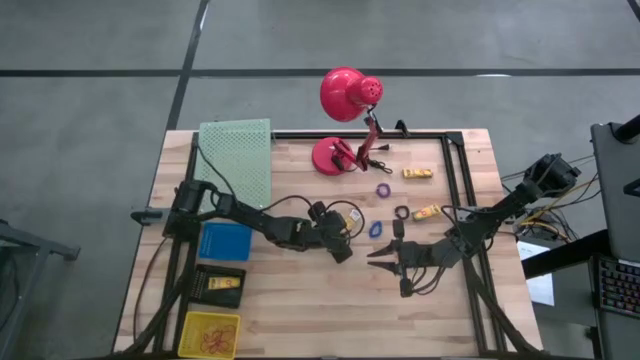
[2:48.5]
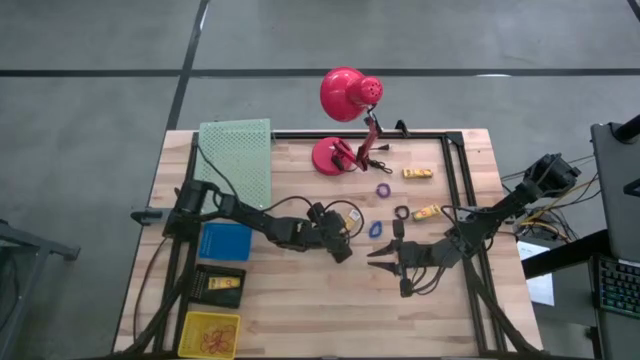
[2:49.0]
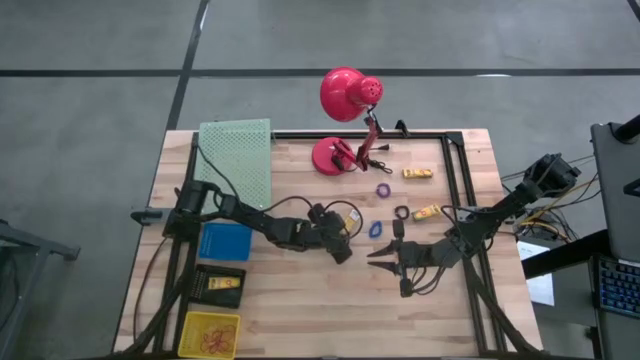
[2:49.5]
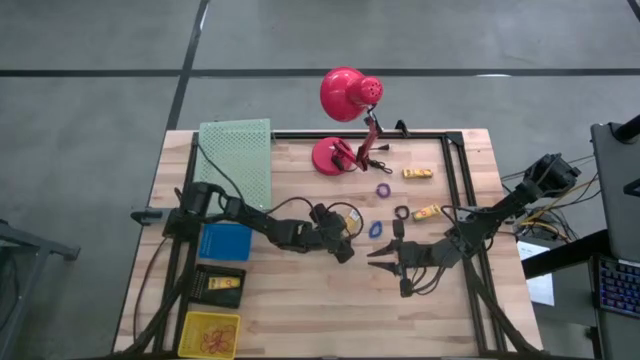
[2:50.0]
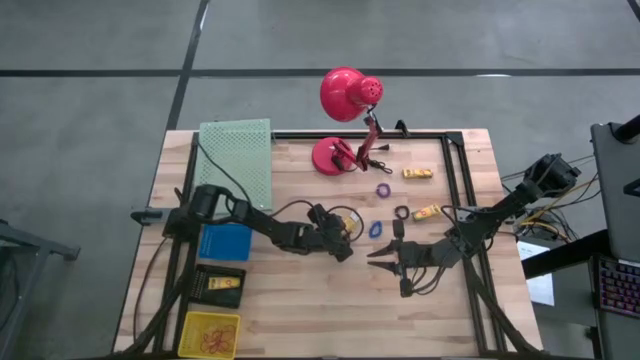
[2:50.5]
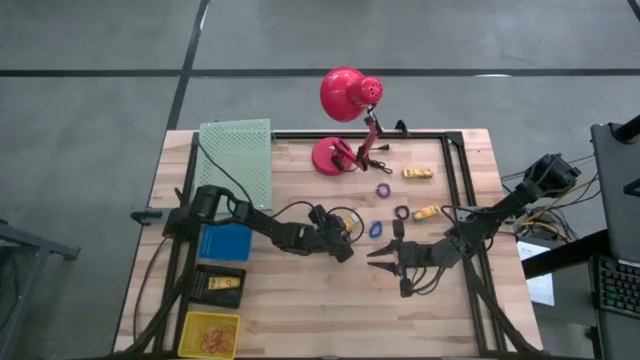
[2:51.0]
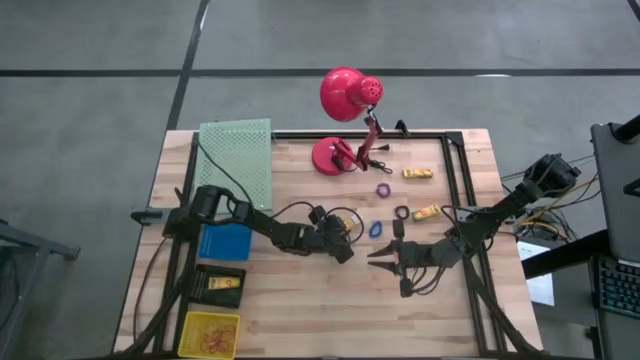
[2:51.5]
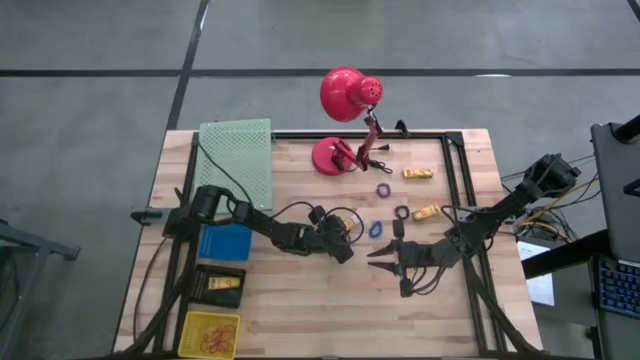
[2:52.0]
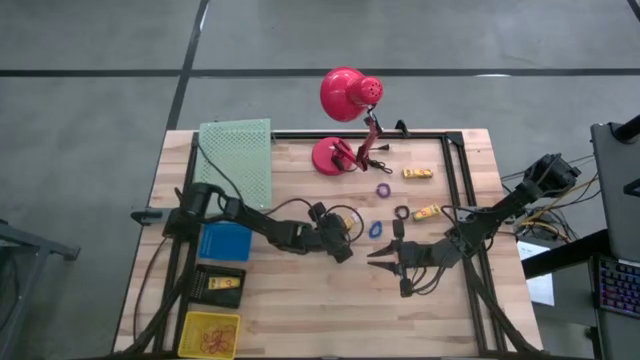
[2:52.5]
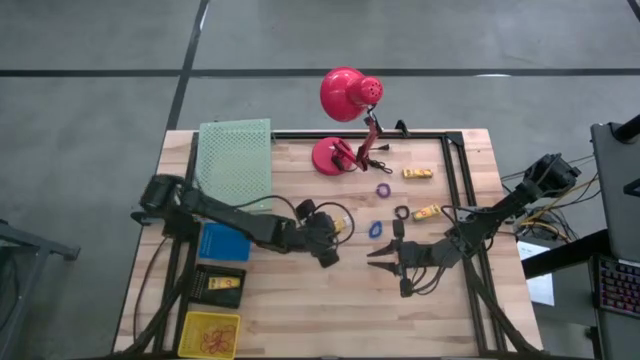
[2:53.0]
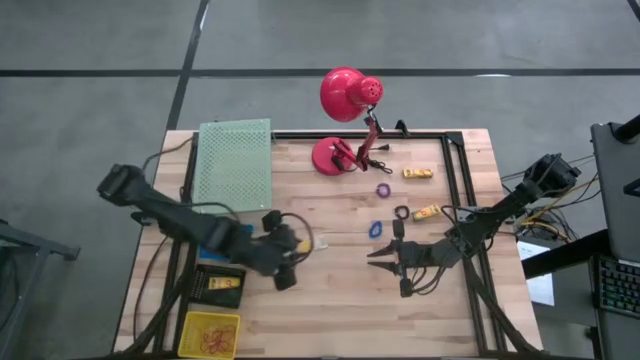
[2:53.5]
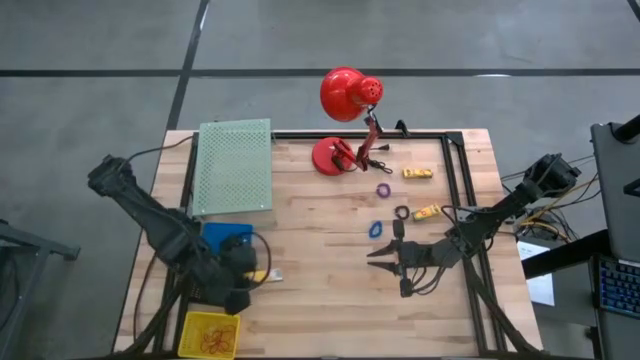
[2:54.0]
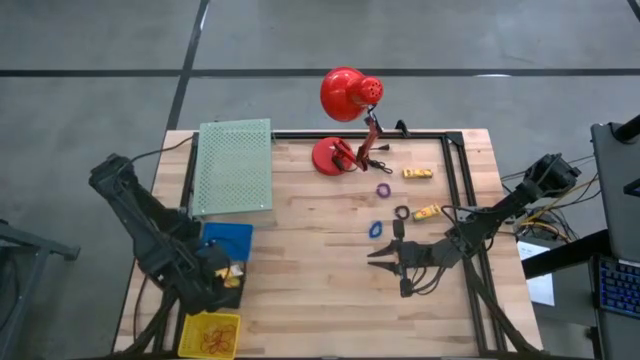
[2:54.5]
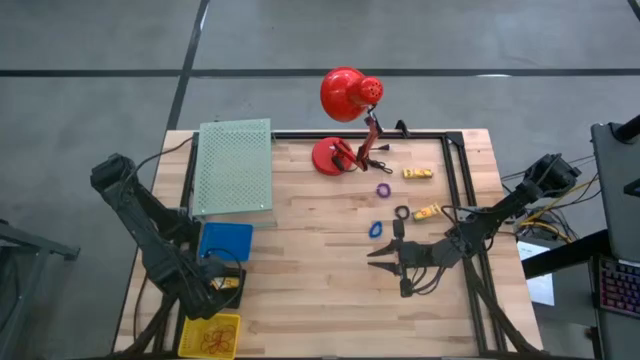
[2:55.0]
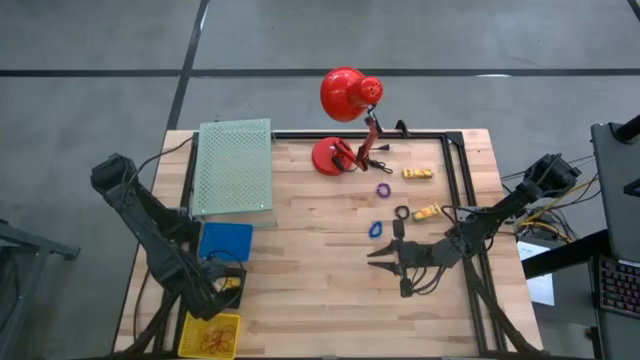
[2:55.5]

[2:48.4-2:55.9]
Task: Pick & Place Office Desk Supplies
Put the crayons box into the black bin

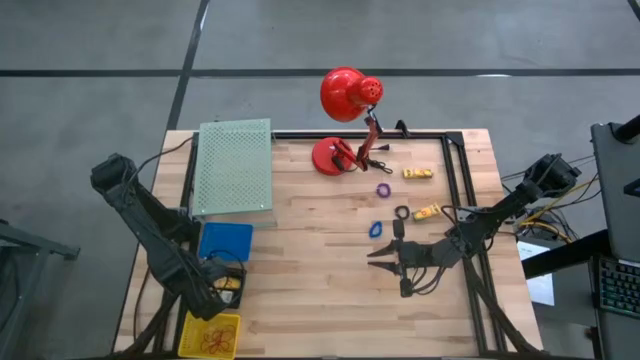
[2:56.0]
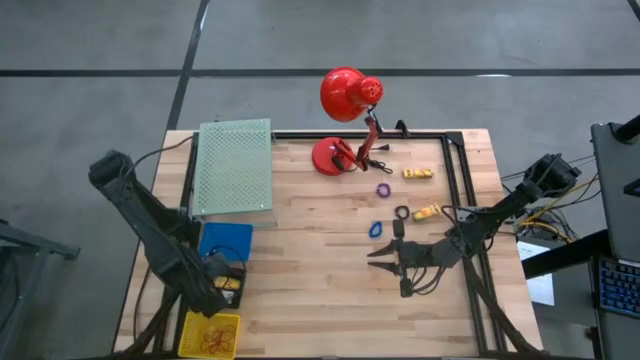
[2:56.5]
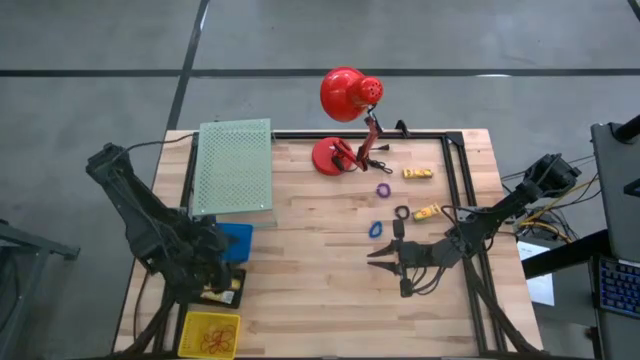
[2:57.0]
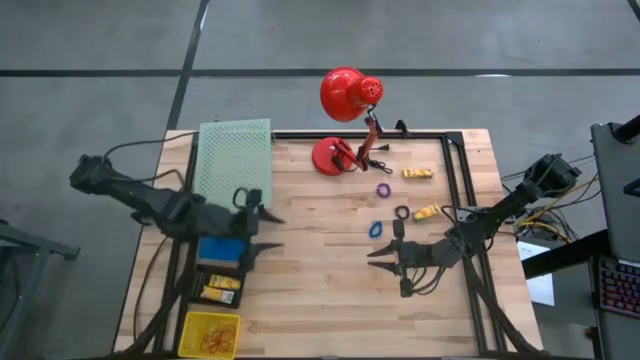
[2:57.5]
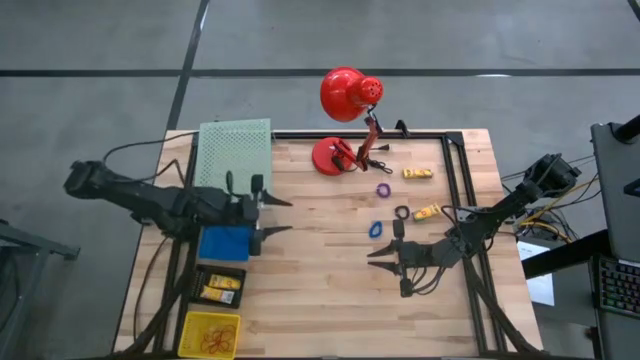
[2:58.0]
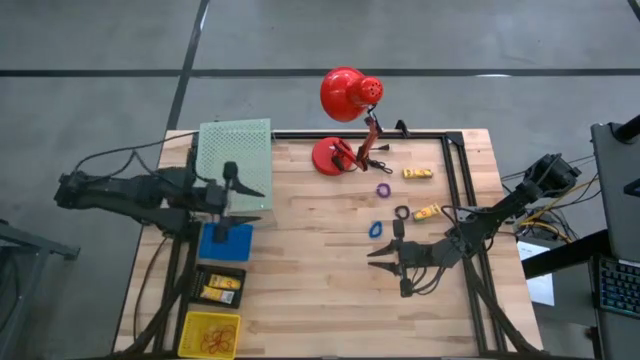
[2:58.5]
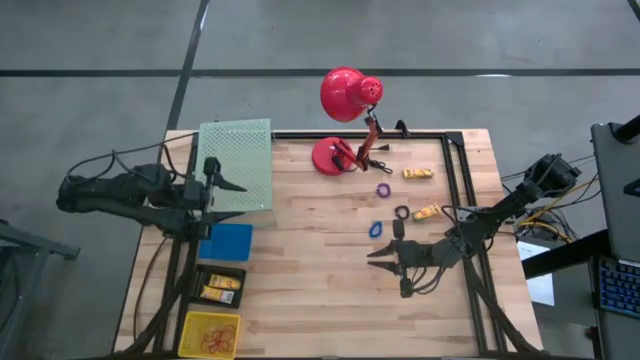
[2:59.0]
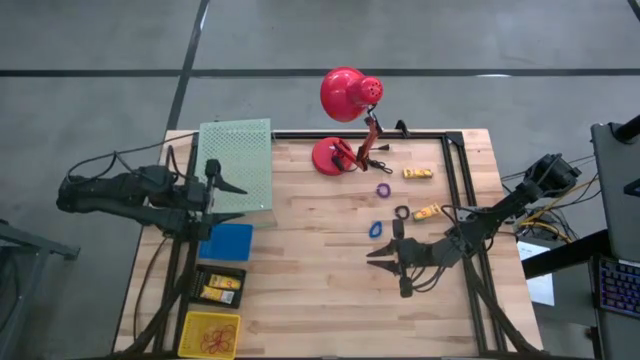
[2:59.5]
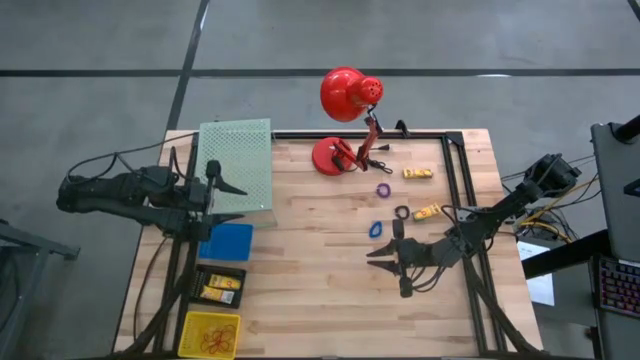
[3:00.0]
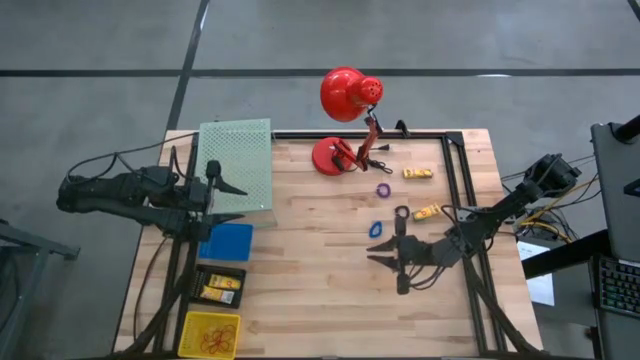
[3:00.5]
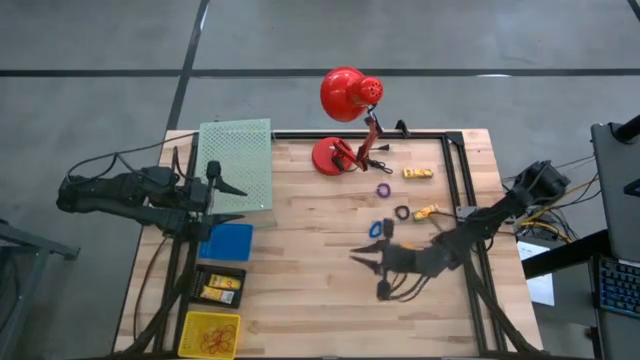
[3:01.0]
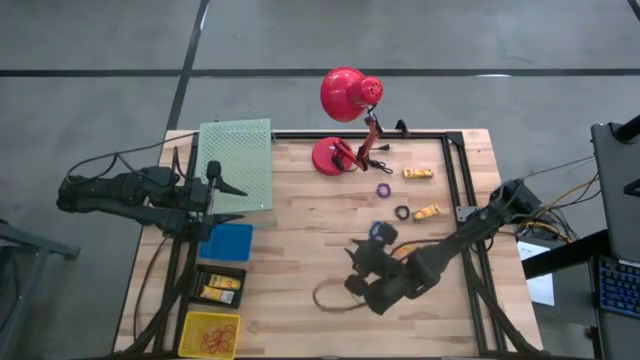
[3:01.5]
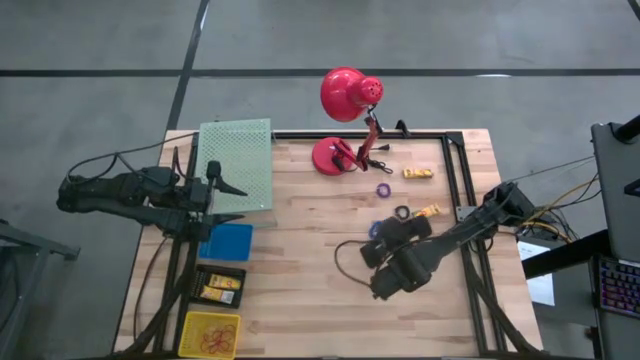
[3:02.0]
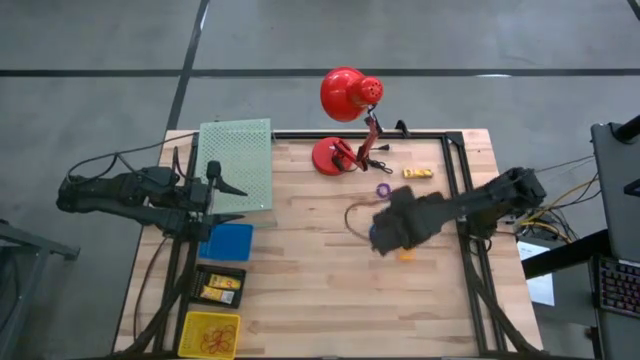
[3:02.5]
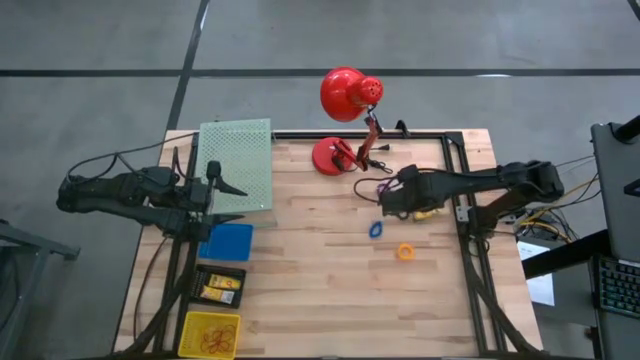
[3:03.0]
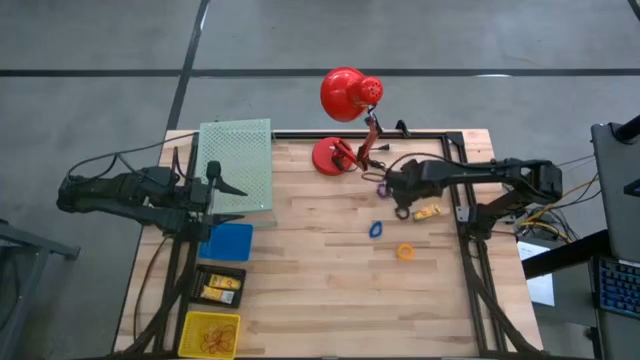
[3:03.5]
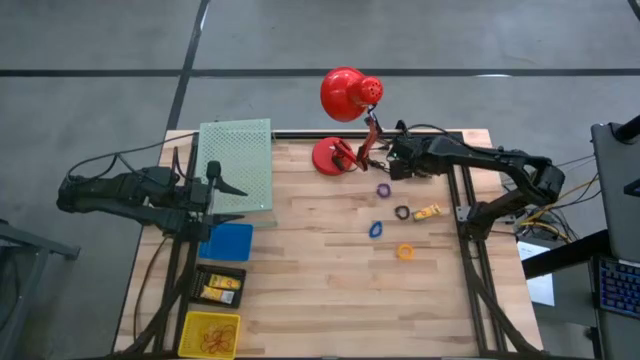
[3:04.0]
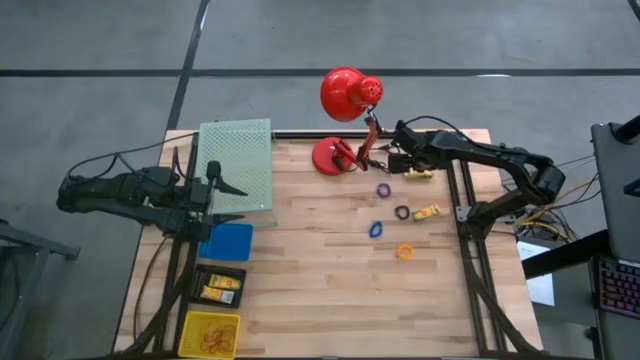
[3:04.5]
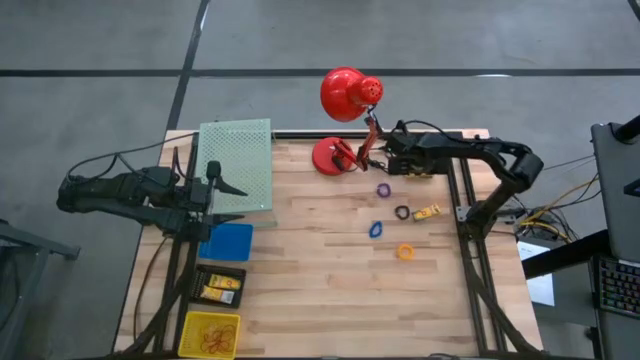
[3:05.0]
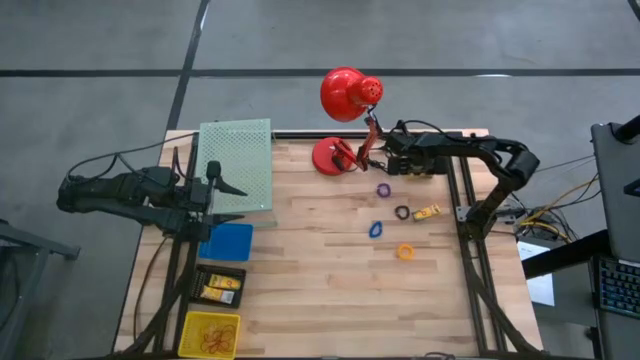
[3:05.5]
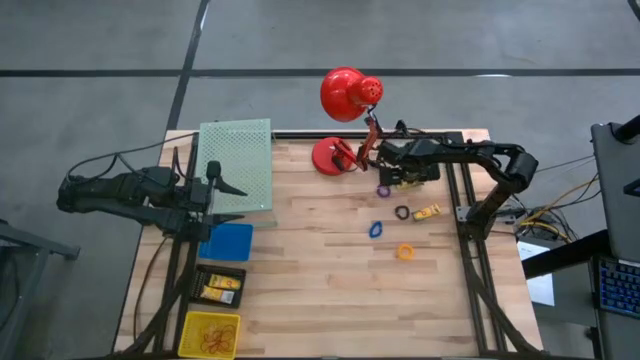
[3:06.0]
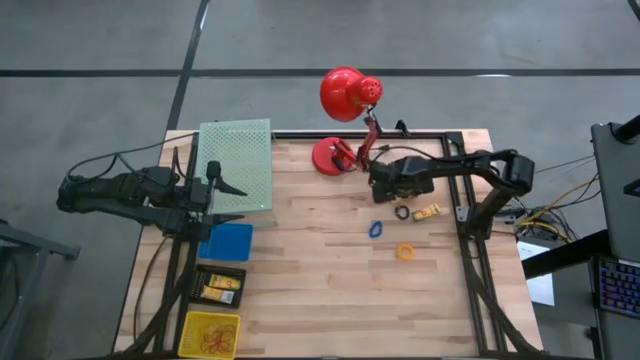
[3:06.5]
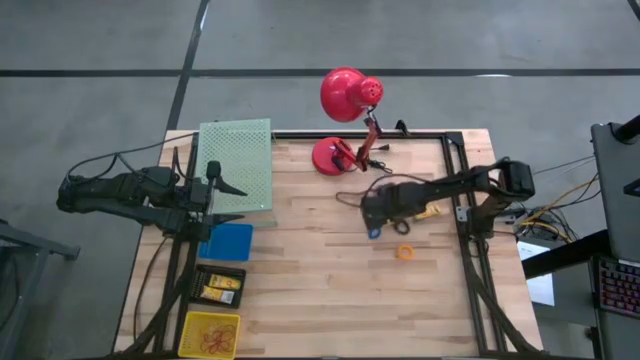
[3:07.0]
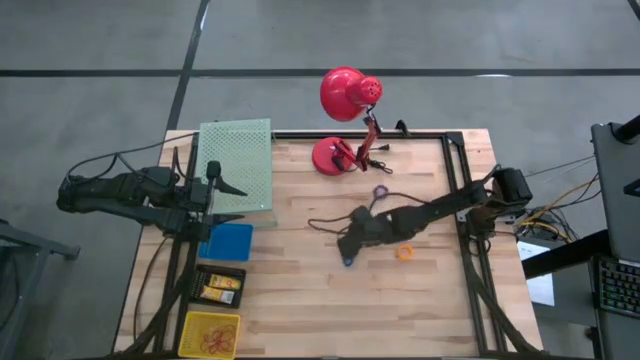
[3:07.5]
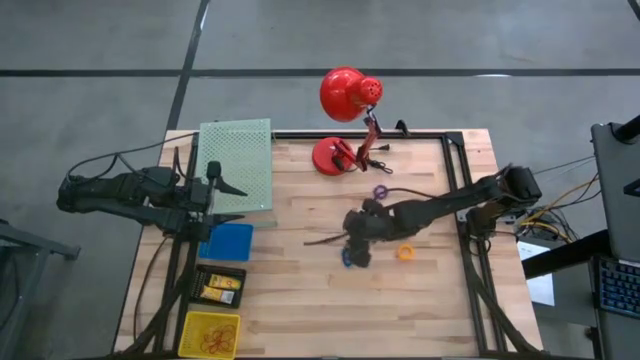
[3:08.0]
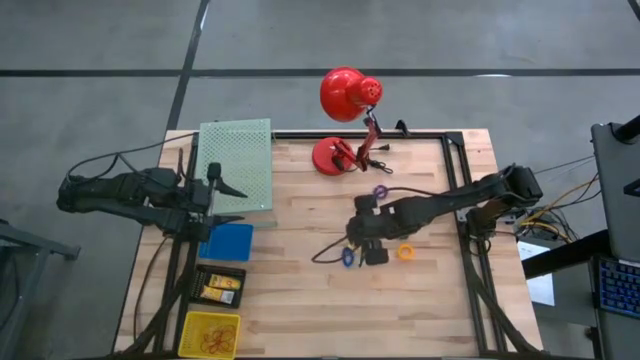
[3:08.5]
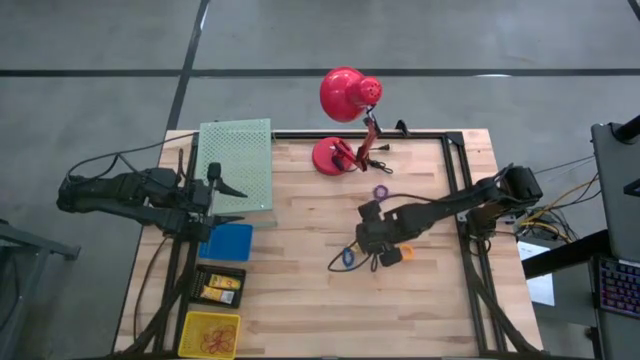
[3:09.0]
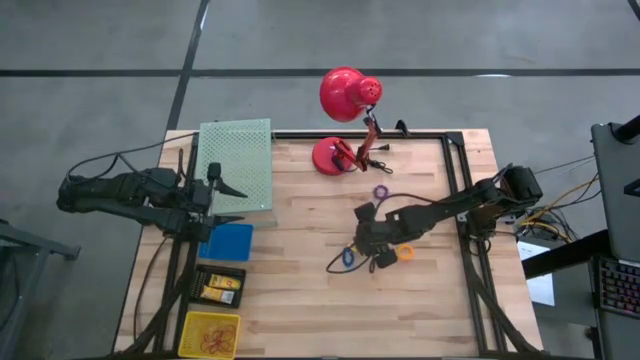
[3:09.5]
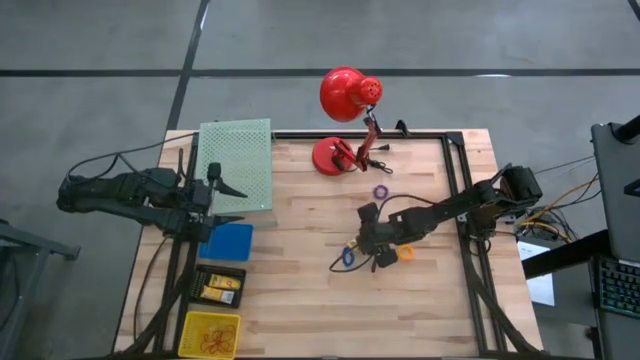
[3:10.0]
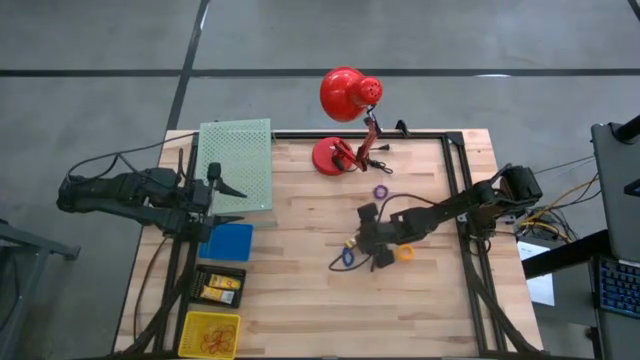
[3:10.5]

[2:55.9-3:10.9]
Put the crayons box into the black bin

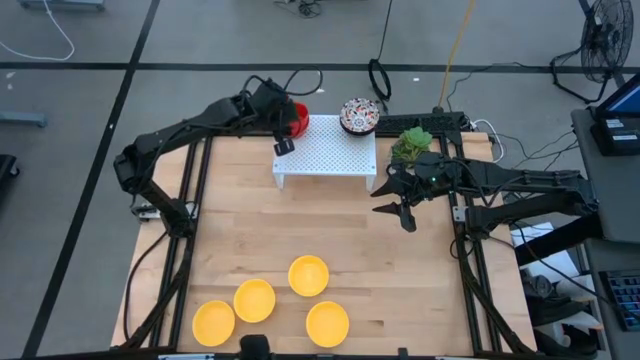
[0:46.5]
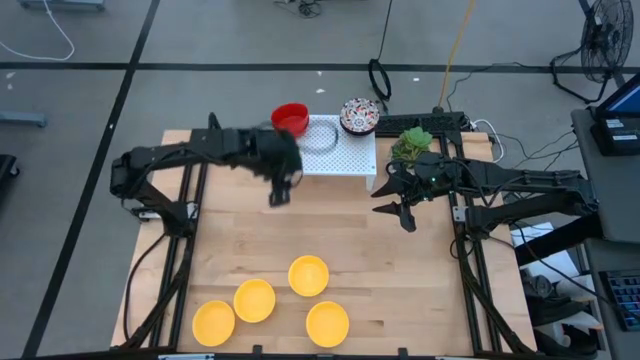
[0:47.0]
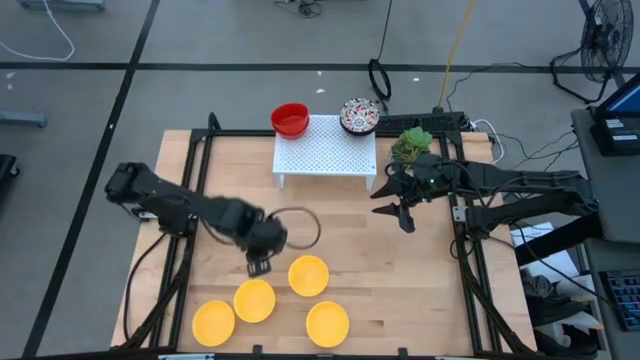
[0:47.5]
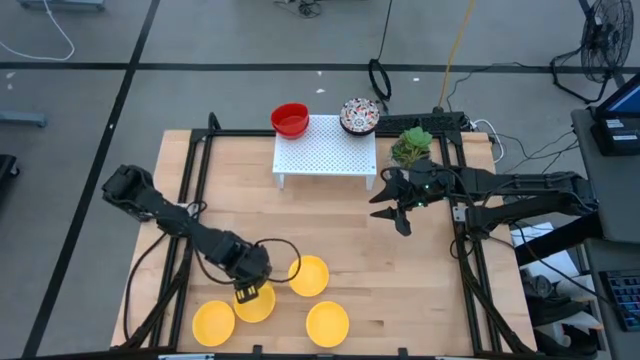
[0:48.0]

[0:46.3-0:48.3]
Task: Pick & Place Mini bowls
Put the yellow bowl on the shelf
